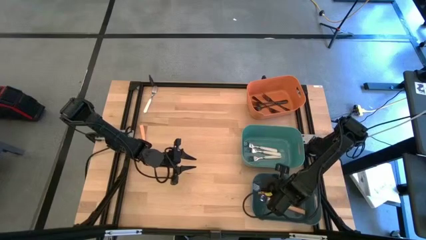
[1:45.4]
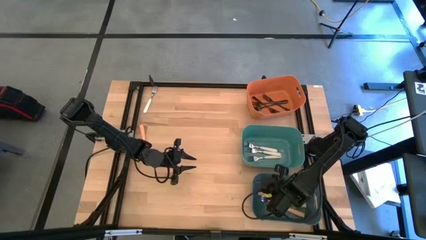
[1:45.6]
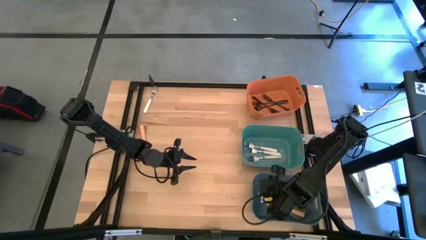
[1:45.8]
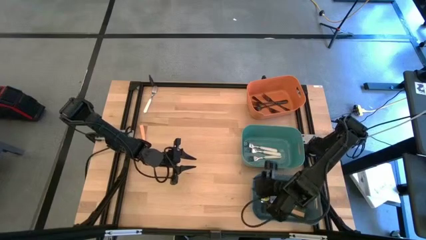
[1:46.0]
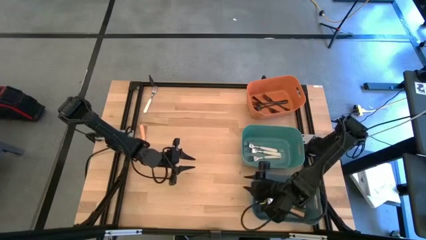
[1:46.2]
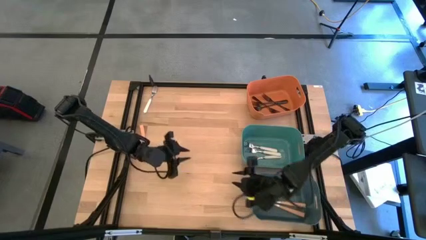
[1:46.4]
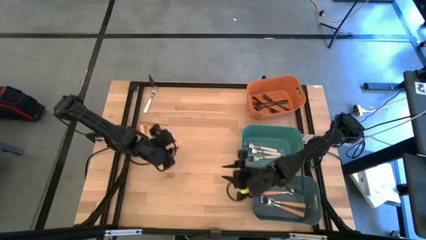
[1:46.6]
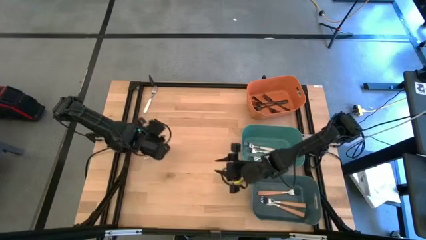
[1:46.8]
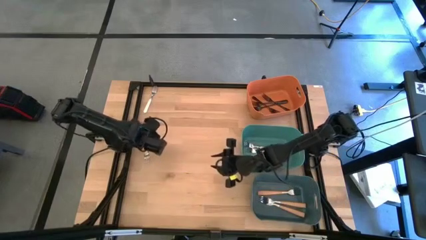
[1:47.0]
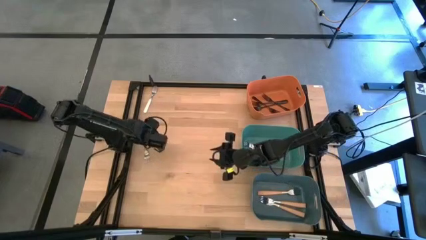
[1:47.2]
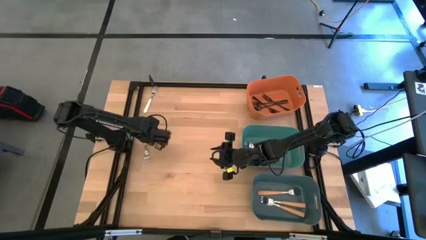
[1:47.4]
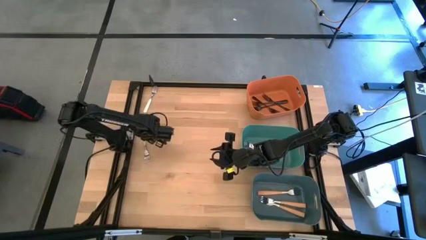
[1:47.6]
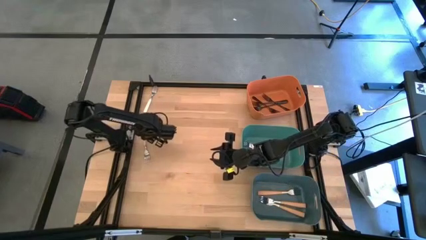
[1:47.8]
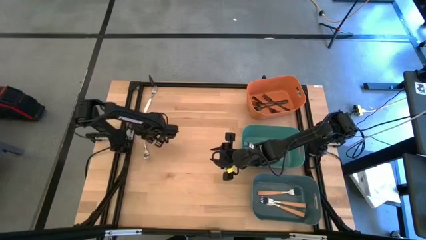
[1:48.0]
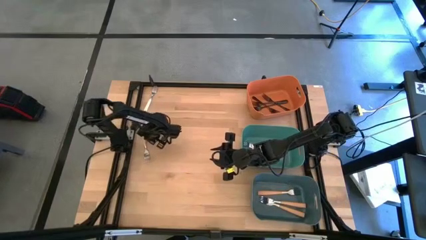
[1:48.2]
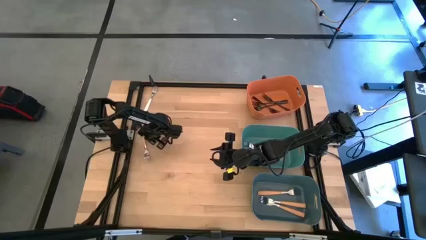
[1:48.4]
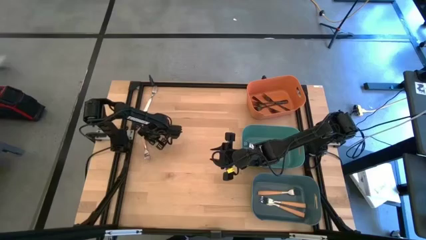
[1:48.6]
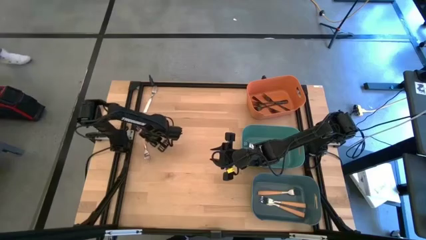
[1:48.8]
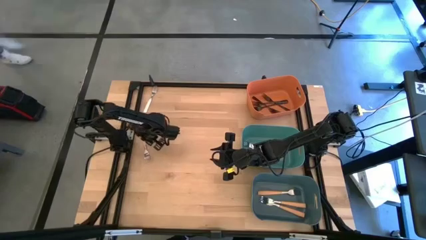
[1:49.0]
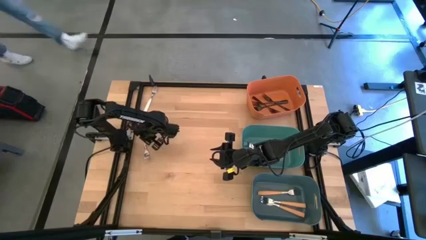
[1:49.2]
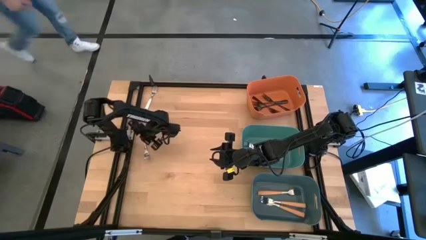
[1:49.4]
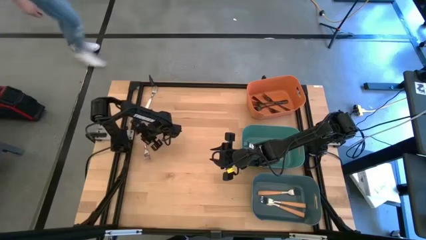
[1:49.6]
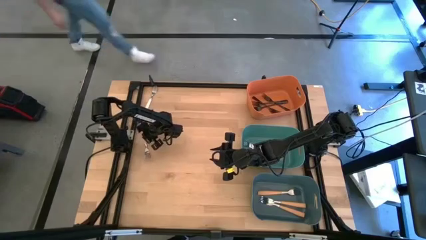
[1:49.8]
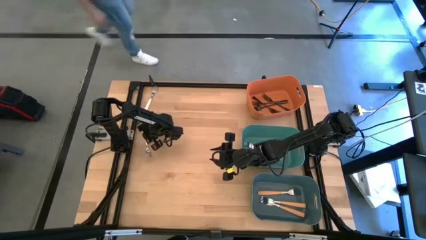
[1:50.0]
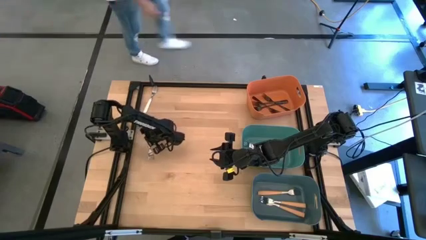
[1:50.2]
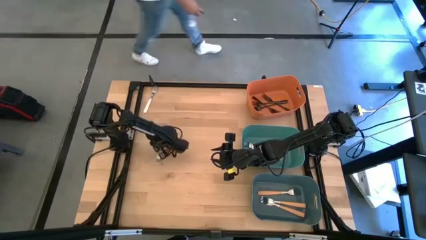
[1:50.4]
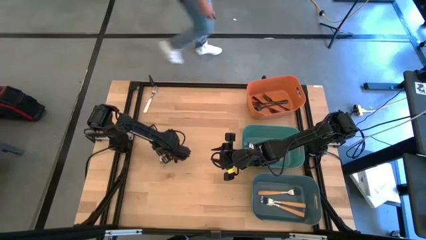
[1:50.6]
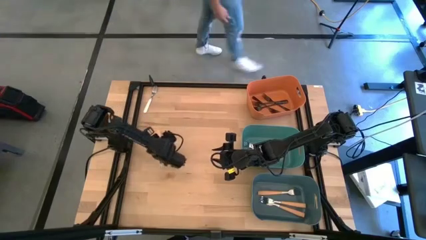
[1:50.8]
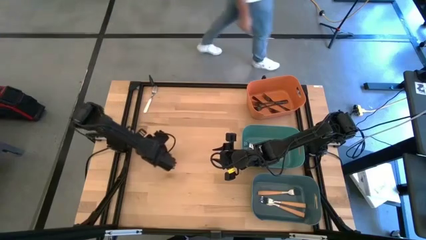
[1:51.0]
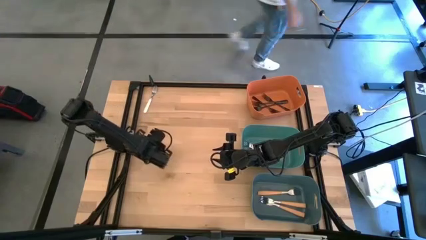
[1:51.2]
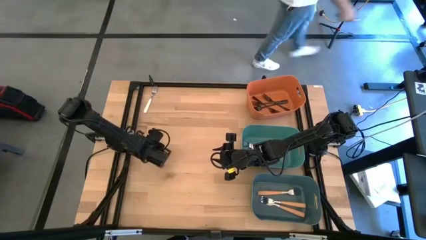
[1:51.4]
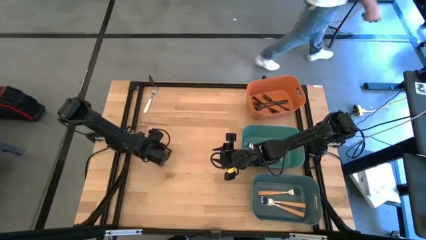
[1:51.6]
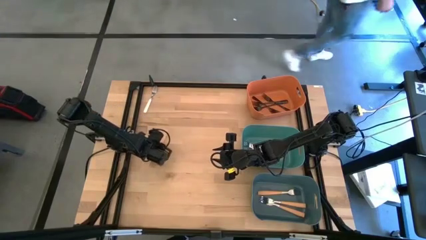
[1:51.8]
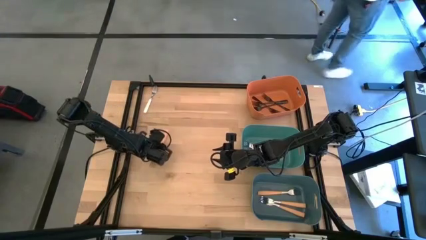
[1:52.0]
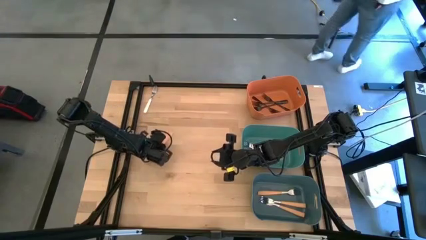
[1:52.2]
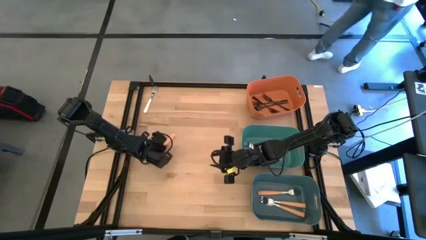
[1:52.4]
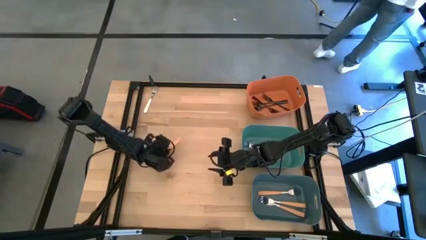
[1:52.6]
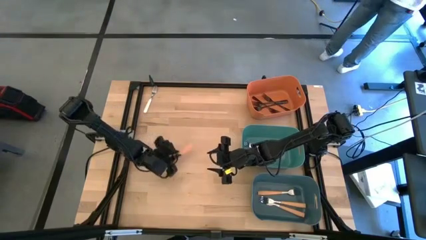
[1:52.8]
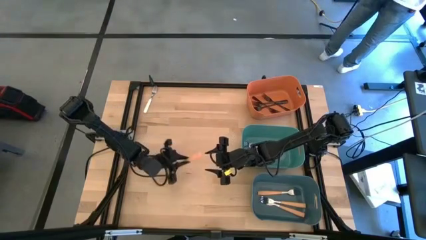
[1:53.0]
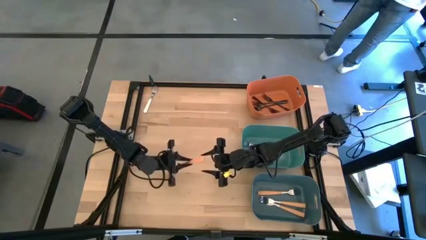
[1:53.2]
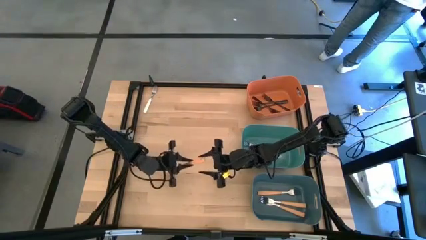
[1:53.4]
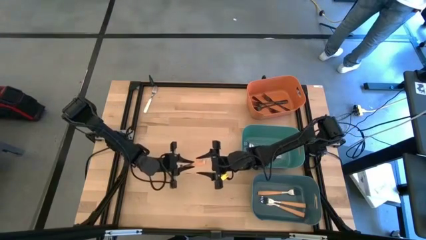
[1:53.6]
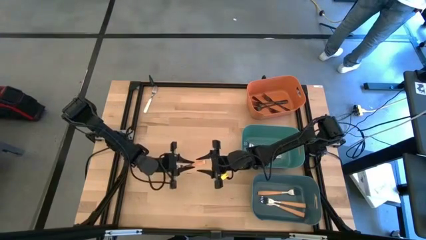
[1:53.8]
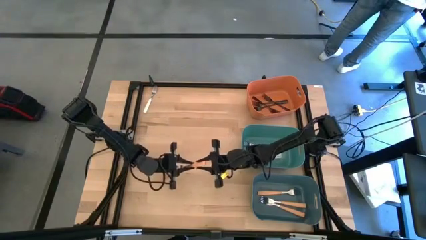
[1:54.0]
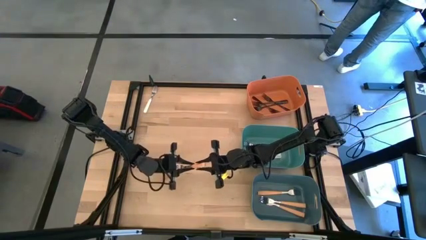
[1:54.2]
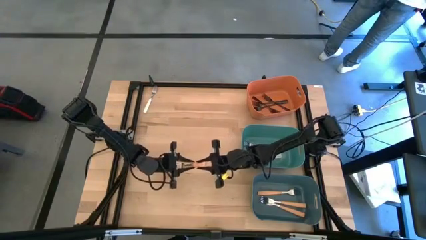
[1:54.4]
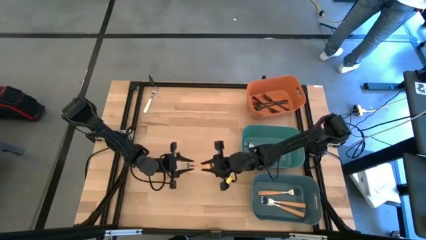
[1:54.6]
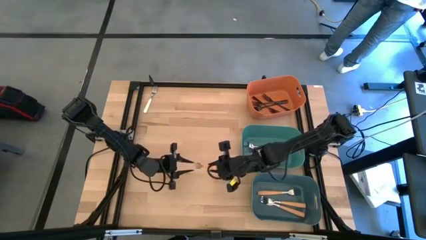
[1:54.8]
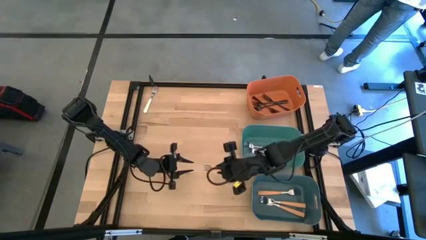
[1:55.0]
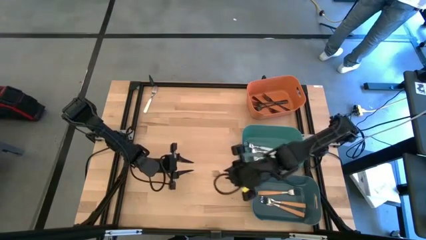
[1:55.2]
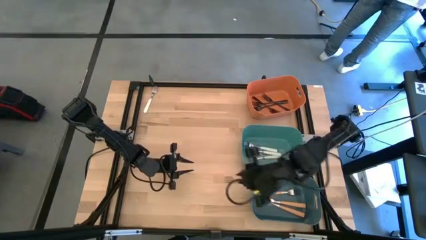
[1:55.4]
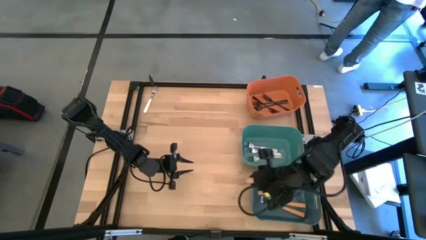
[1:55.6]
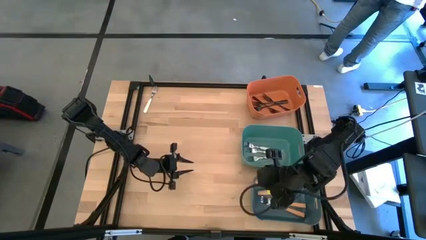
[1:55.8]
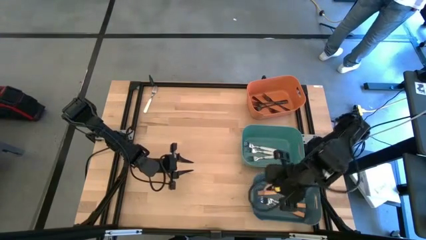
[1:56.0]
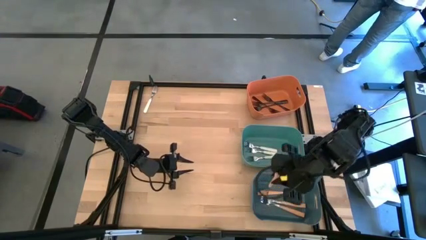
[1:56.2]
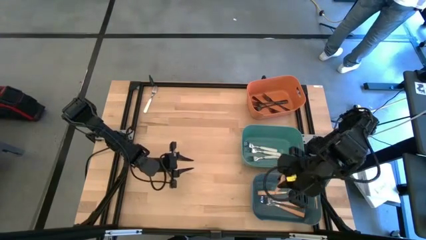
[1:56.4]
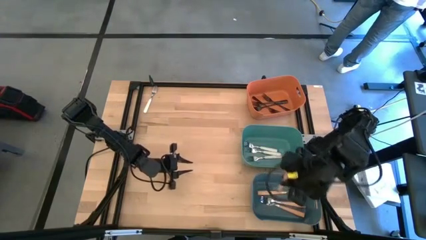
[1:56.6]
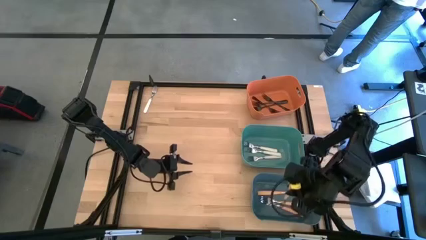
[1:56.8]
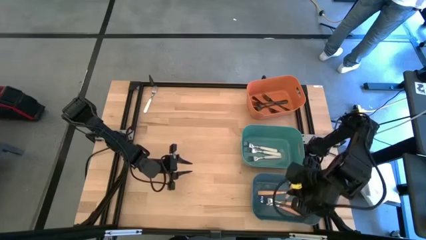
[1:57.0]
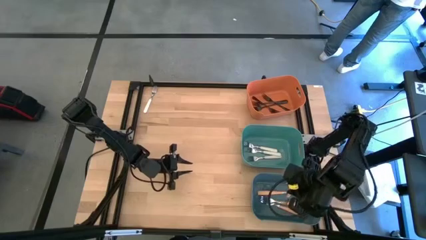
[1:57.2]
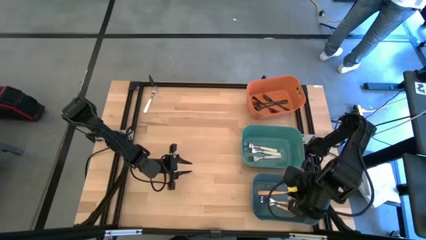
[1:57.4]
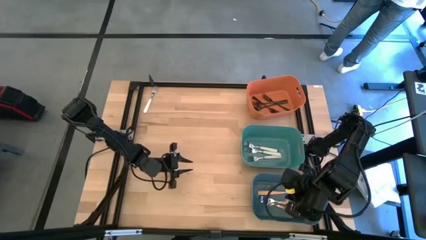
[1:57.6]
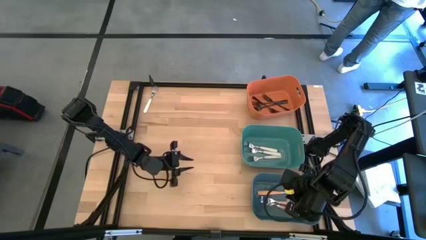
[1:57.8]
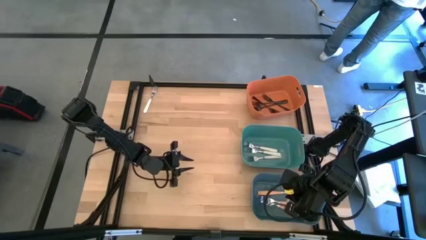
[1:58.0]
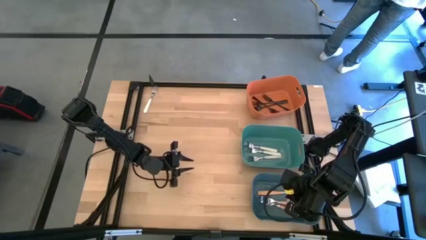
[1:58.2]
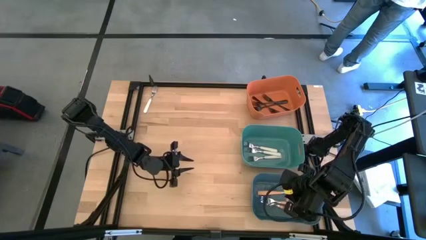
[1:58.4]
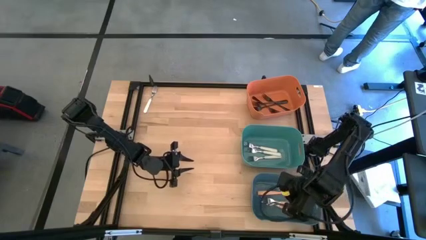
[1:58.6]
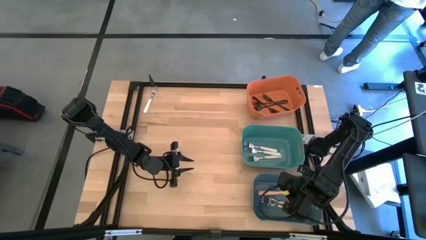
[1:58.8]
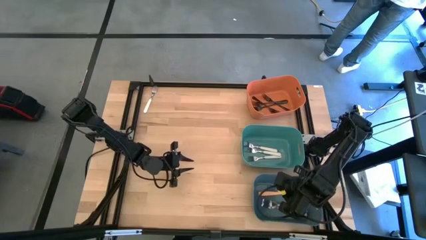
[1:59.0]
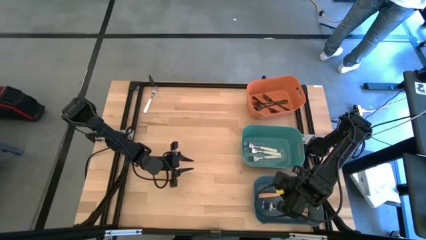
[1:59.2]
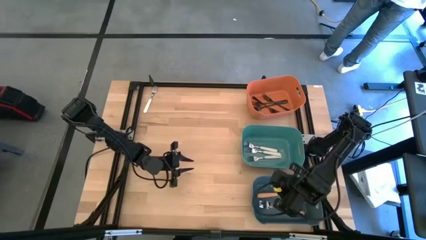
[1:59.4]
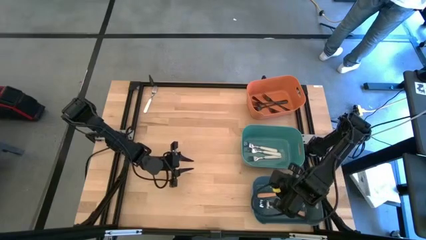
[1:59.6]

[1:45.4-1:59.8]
Task: Sort silverware by color (type)
Put the orange fork into the dark blue bin

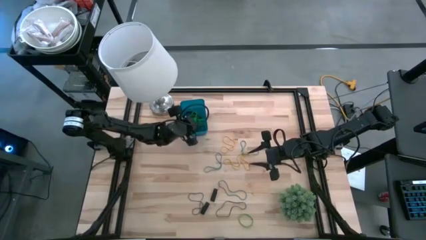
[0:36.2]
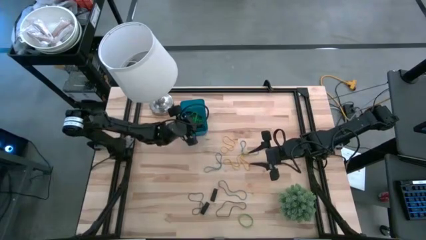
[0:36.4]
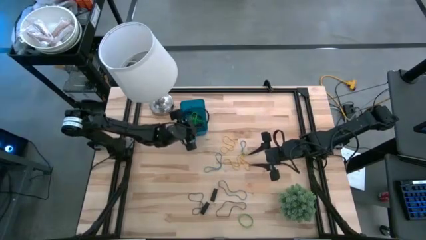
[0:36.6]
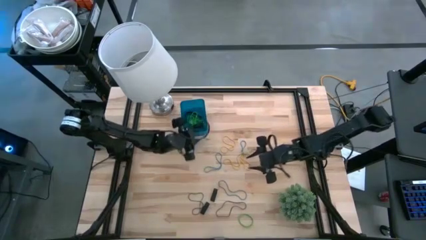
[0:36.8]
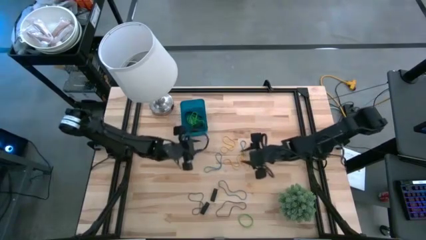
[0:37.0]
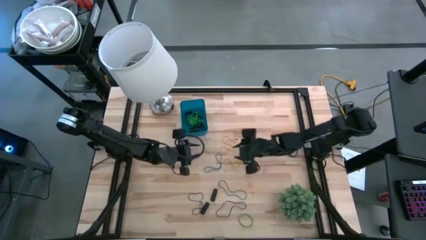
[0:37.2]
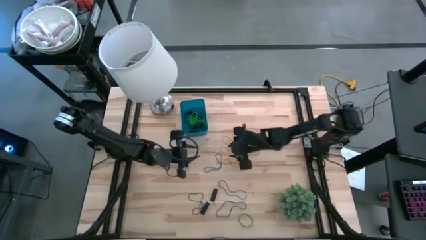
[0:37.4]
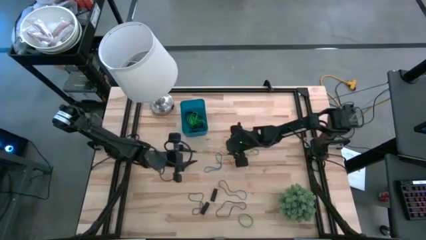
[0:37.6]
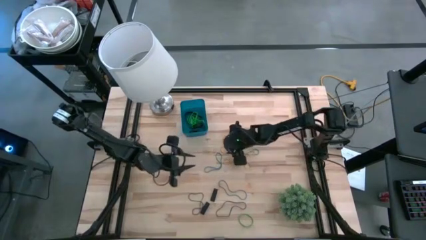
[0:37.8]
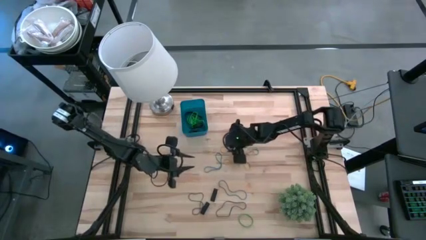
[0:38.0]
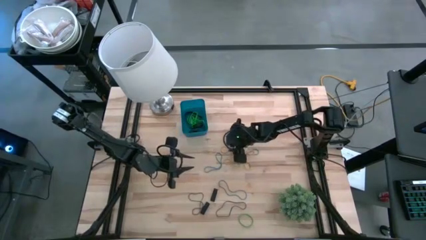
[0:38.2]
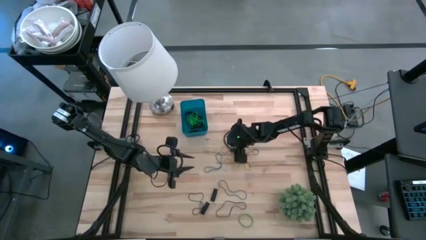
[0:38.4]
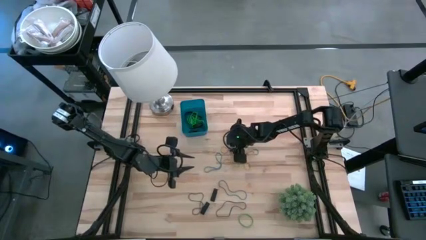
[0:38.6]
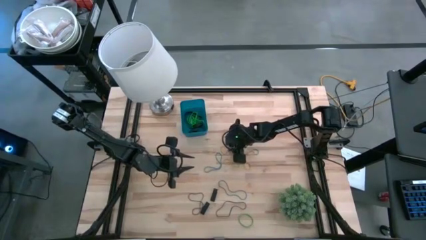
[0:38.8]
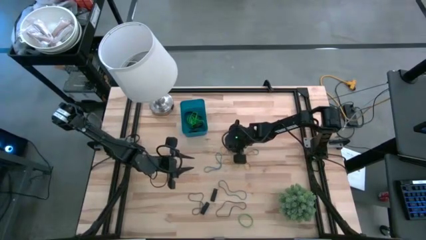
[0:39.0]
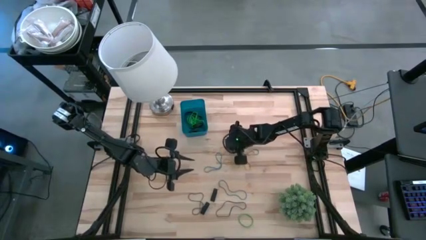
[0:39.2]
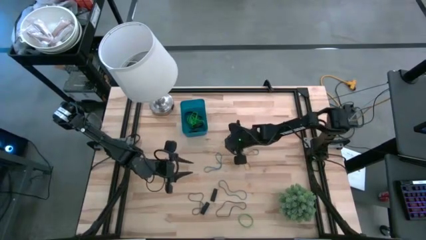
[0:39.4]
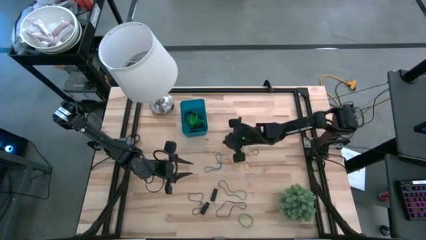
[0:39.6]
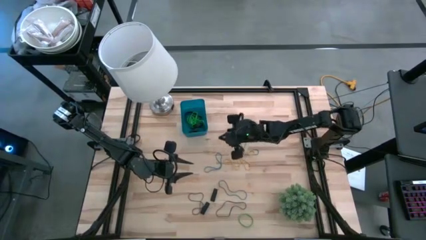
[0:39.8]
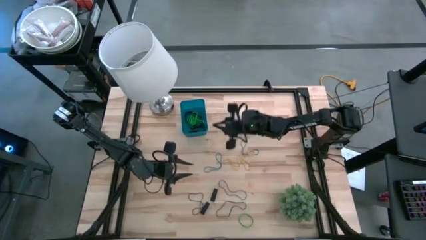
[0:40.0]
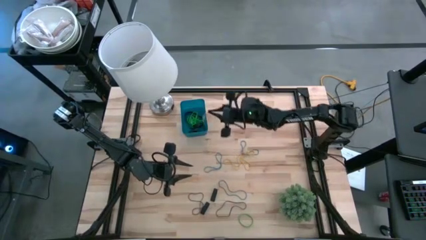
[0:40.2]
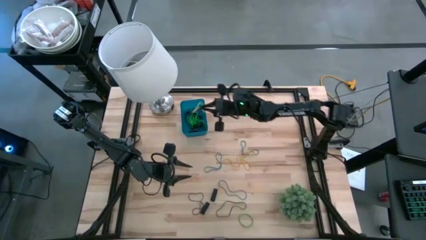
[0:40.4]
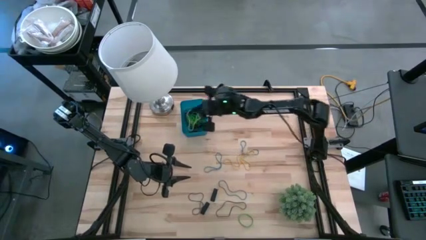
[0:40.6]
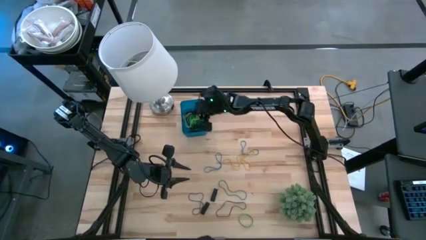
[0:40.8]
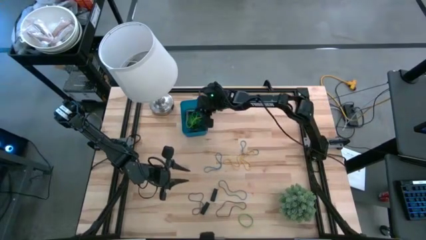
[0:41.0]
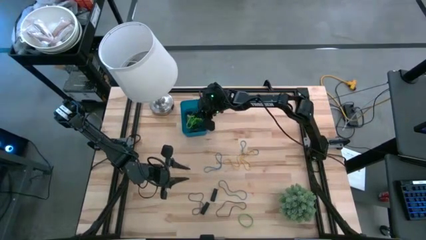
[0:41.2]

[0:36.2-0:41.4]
Task: Pick and place rubber bands into bin
Put the top yellow rubber band into the blue bin
